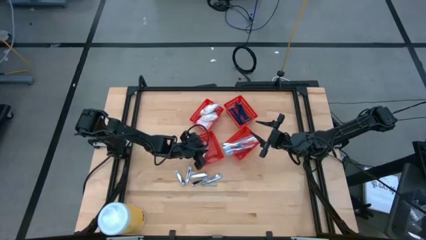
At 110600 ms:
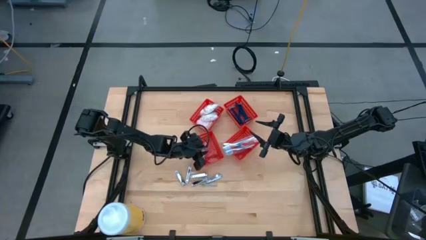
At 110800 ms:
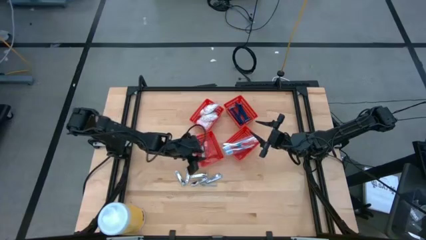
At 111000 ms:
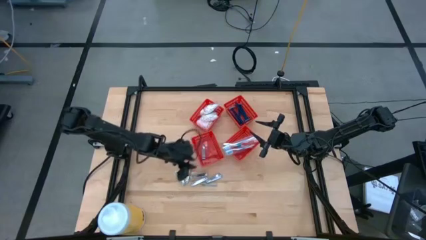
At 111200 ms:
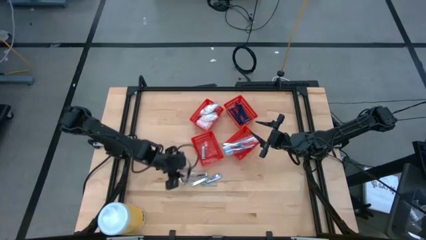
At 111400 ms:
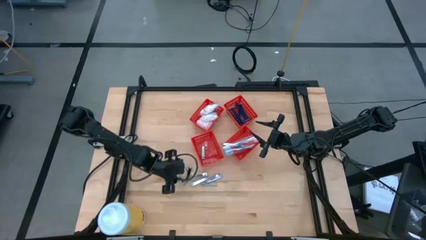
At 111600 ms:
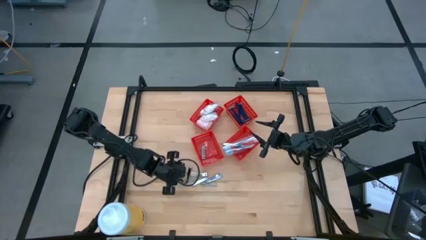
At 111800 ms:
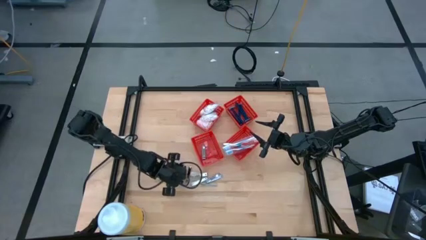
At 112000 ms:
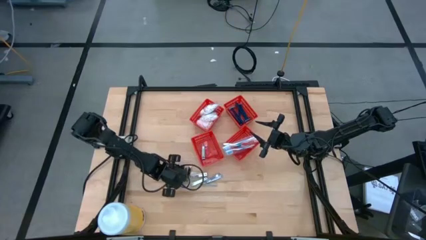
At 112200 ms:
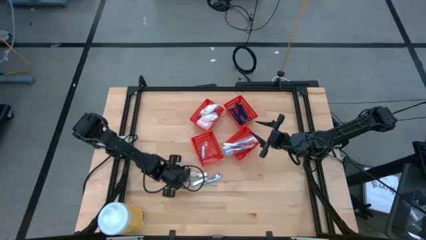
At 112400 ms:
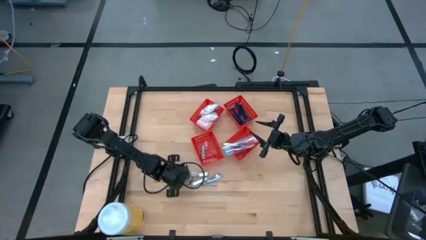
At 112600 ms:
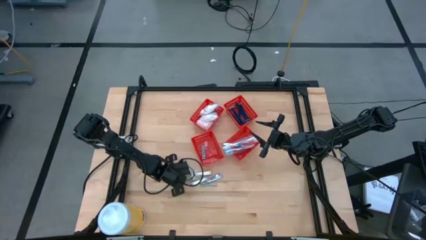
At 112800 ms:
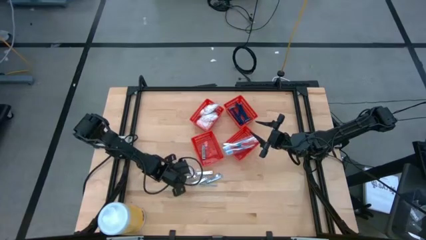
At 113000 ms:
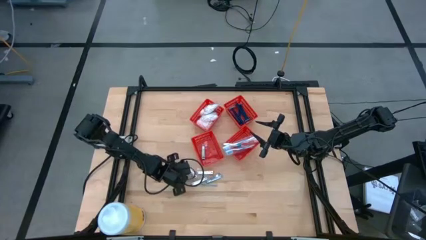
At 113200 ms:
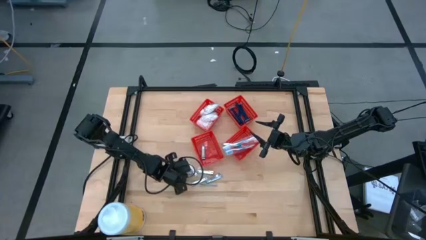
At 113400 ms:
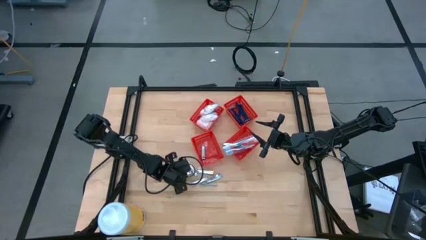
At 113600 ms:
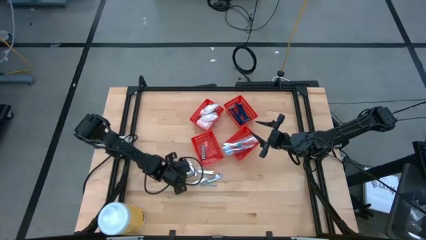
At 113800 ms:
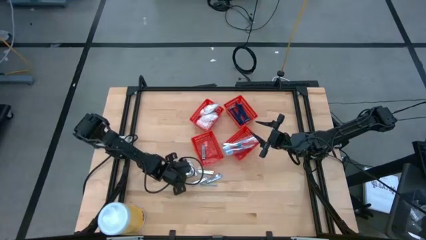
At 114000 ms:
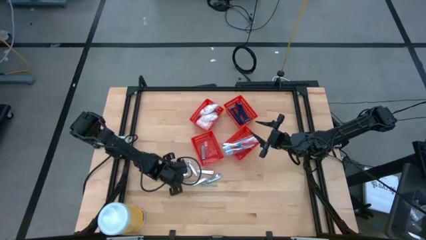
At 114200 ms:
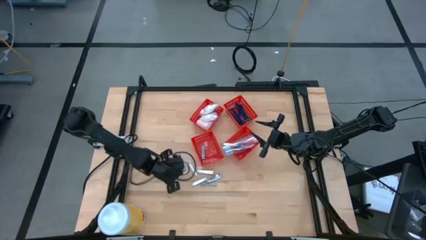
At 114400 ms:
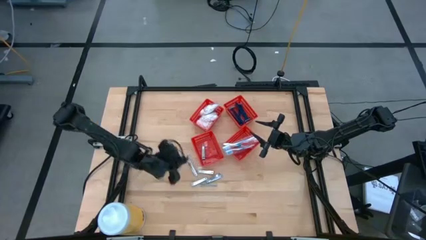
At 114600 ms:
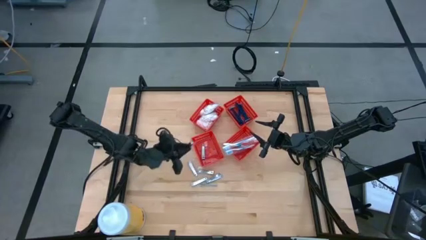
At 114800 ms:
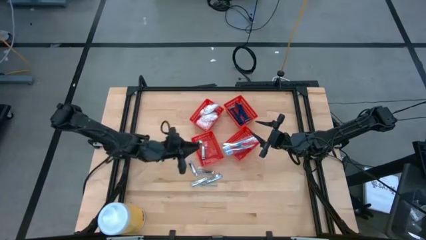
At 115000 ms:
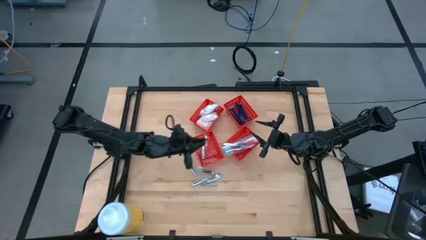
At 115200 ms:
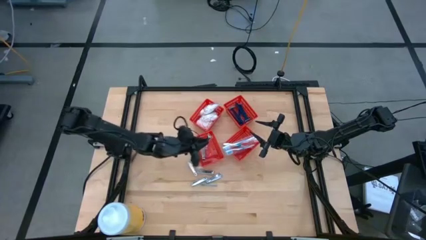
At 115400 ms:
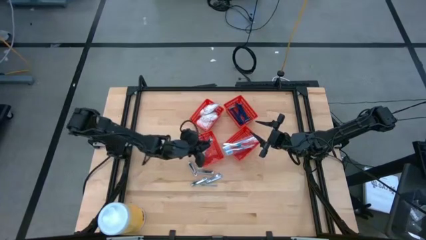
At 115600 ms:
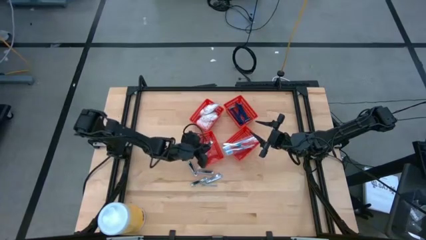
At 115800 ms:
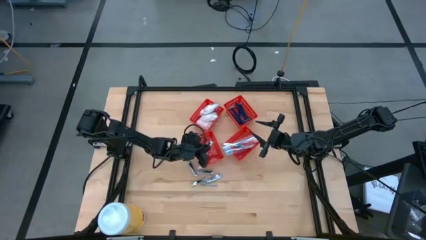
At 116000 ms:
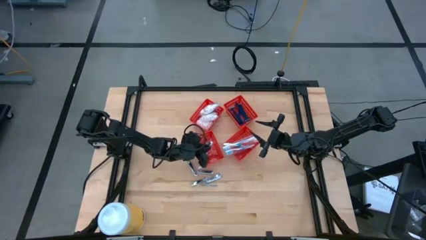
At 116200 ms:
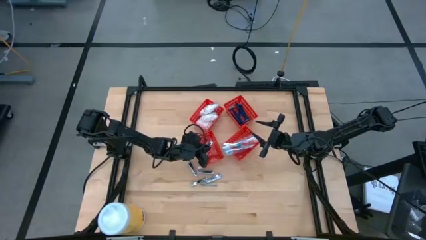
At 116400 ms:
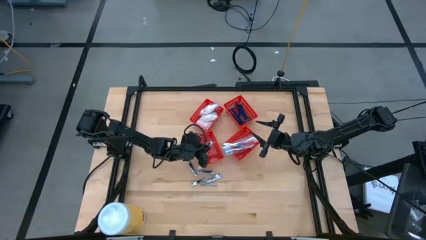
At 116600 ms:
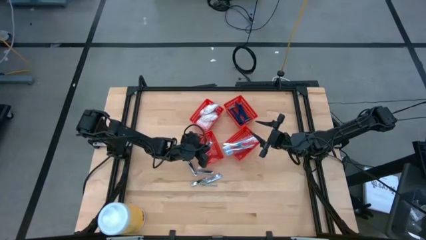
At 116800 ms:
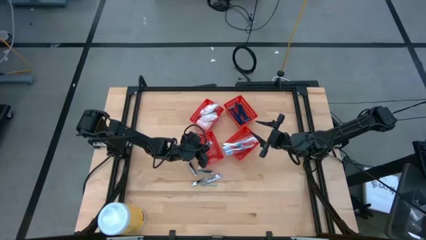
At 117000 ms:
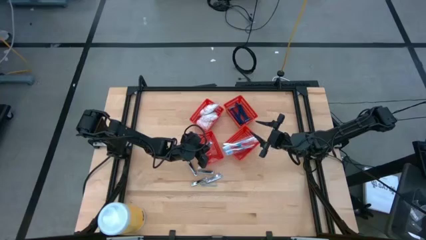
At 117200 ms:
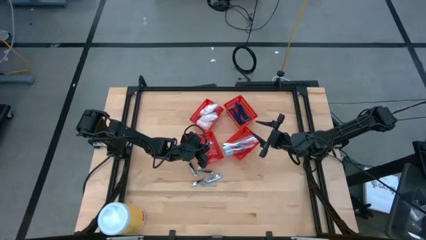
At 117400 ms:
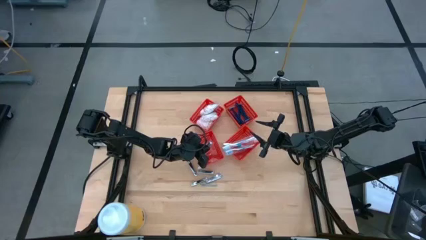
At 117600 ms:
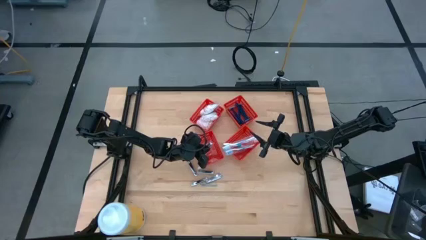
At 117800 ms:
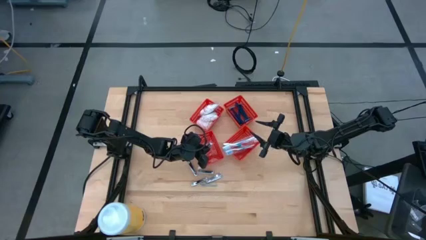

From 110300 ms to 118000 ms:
Task: Pick & Place Travel size toiletries
Put the silver nail cutter into the bottom left red bin

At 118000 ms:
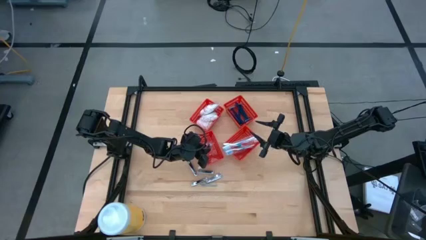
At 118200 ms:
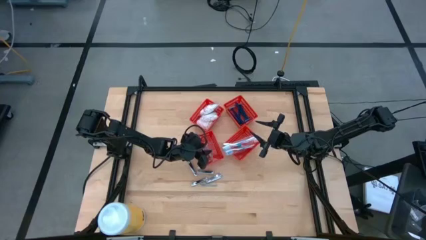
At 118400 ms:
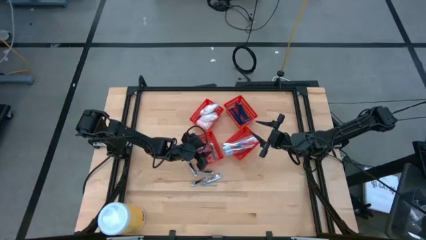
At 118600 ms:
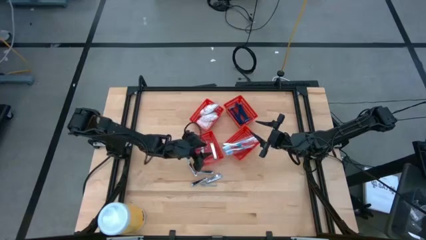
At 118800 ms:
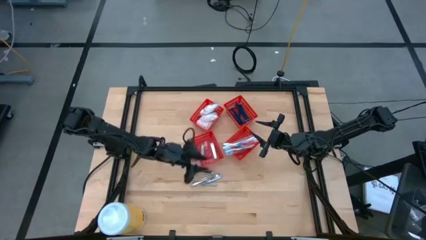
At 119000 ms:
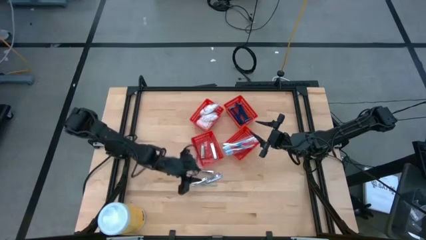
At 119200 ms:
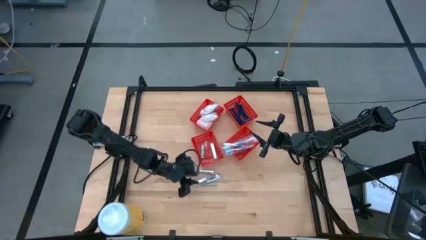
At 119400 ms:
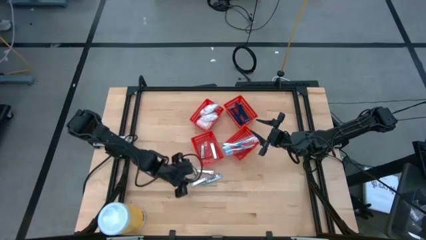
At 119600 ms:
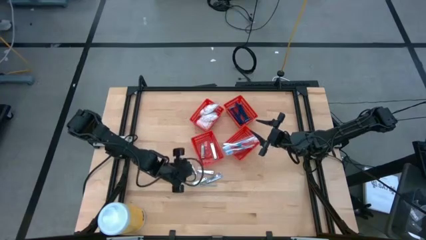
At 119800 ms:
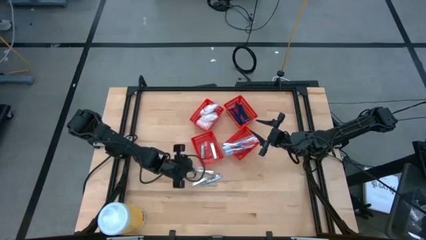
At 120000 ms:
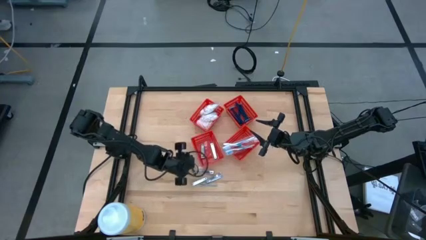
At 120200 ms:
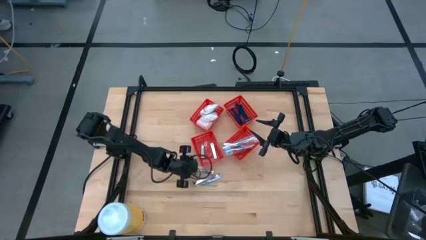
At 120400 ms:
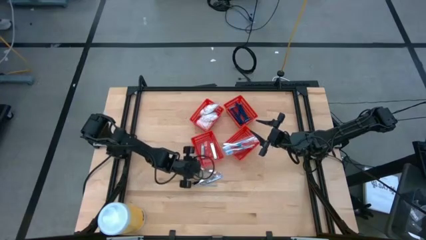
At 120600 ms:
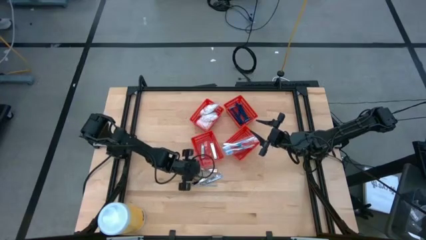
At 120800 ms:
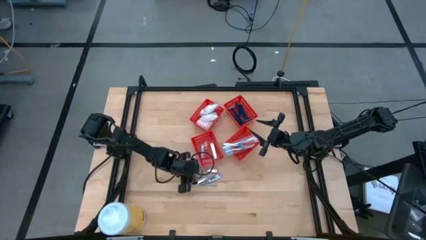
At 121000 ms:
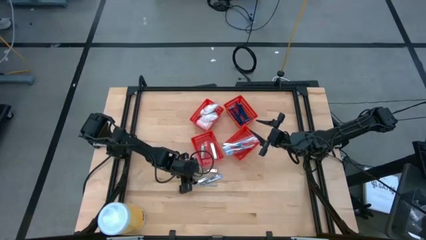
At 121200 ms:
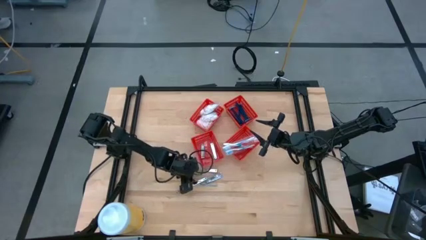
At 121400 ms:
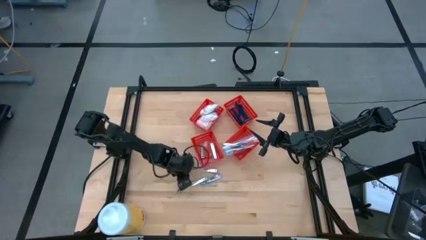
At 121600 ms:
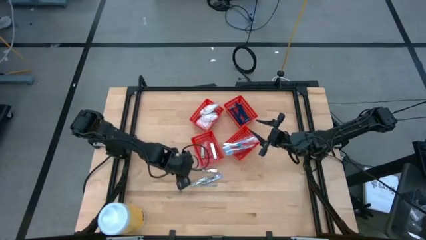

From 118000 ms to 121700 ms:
Put the silver nail cutter into the bottom left red bin

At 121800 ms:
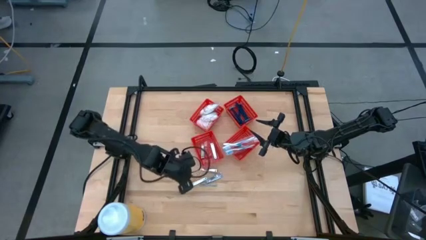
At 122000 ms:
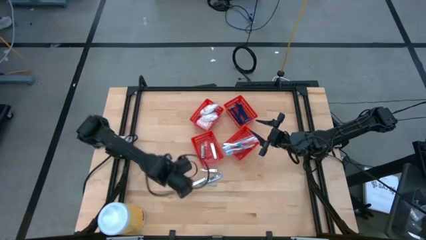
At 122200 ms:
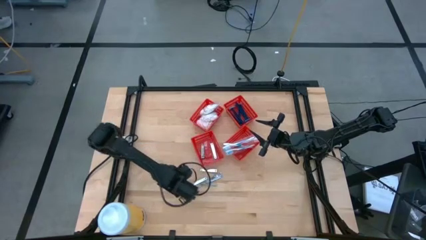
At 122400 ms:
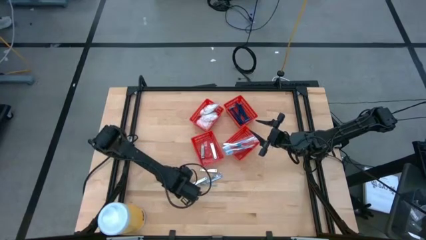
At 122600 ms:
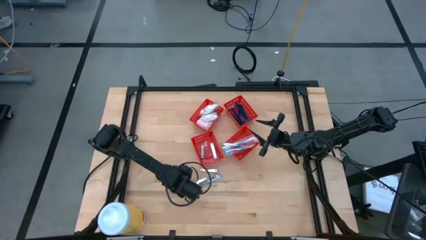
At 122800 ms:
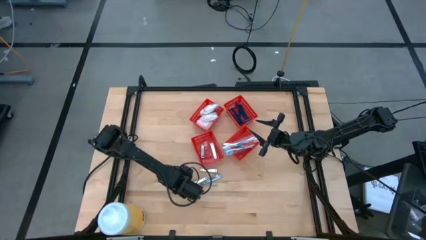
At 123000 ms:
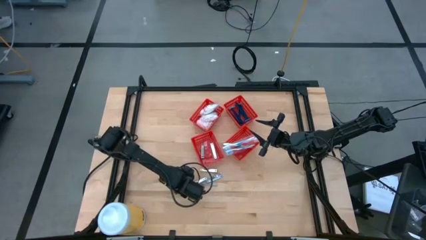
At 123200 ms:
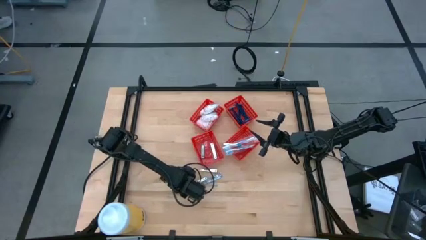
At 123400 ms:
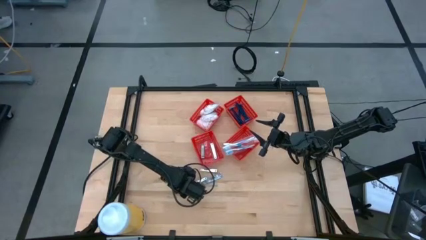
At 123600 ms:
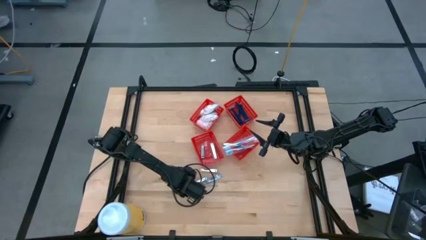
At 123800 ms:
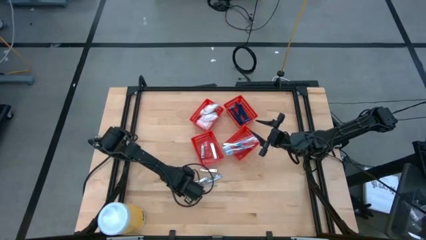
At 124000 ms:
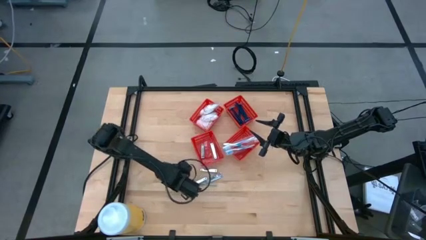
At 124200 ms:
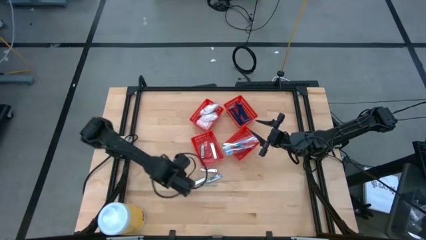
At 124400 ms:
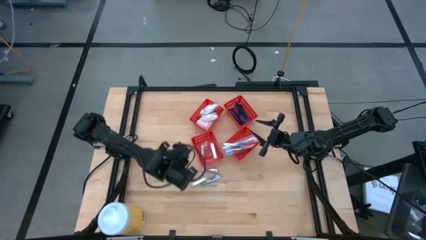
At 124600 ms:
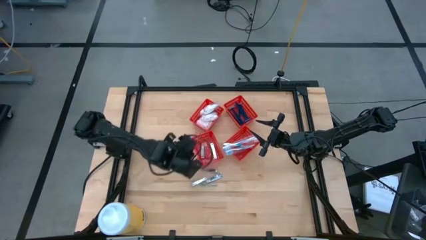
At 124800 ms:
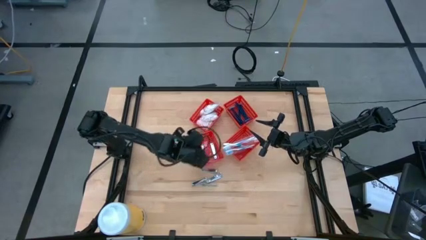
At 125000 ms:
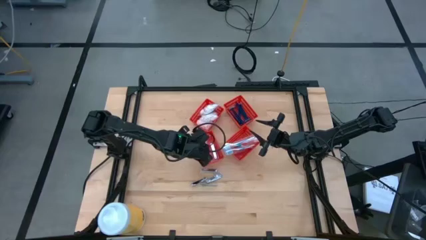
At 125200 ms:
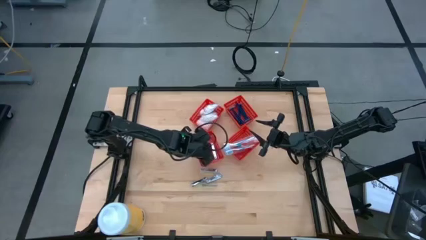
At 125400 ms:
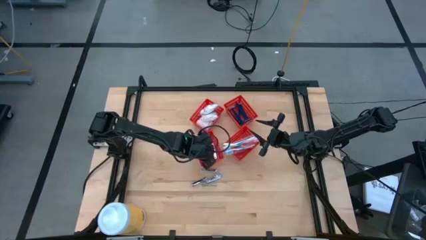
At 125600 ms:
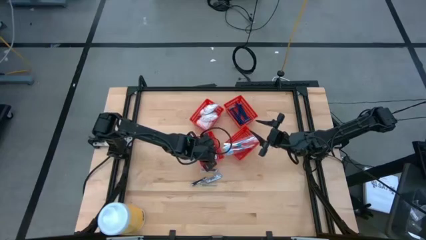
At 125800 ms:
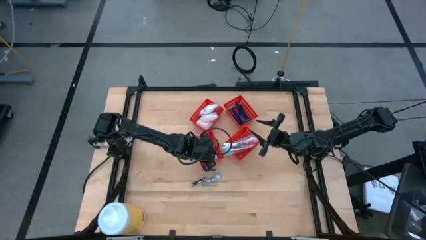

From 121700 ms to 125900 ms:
Put the silver nail cutter into the bottom left red bin

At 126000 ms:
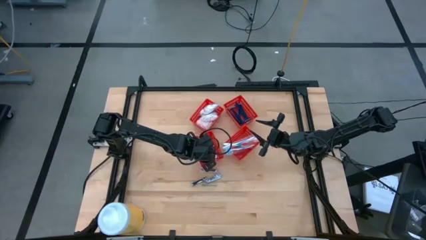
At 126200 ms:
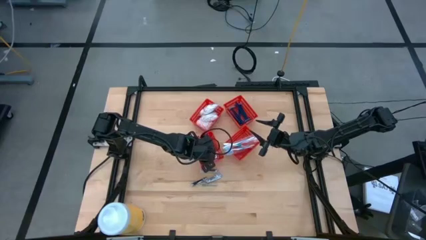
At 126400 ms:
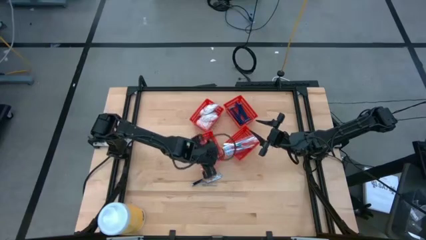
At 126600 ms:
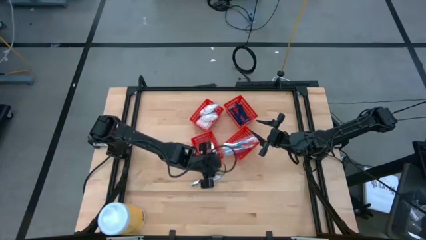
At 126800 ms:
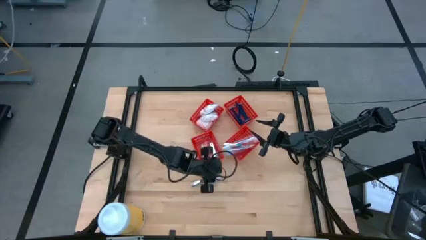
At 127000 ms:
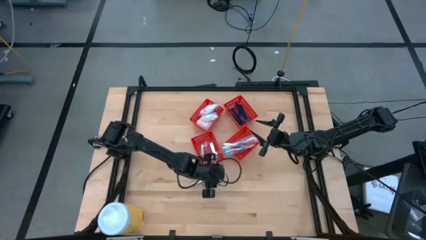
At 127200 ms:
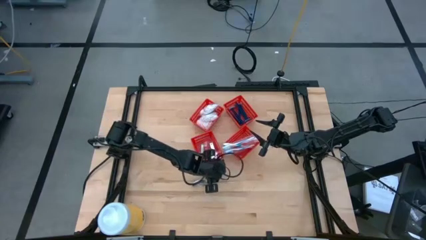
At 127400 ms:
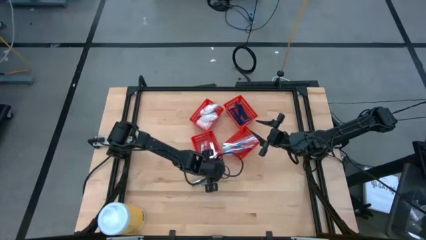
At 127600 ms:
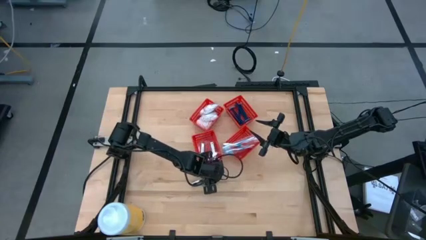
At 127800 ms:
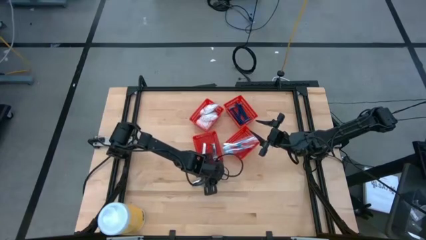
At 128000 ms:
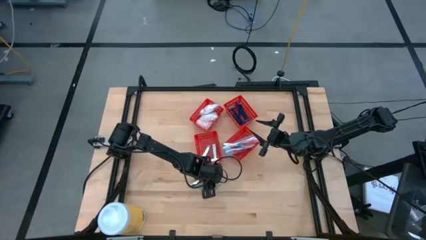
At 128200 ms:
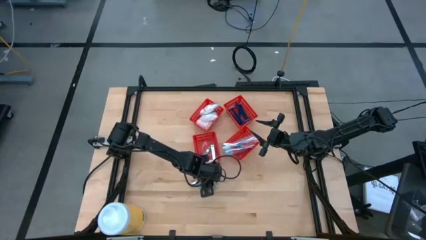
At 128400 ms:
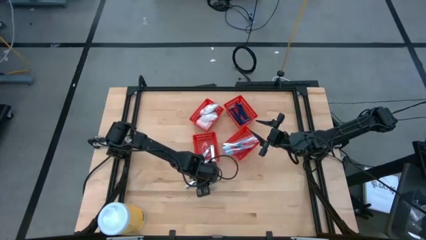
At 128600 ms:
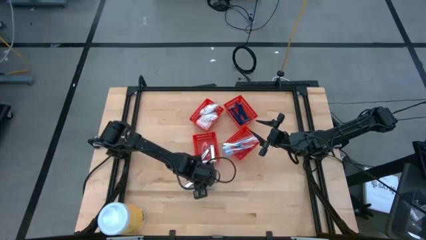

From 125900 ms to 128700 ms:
Put the silver nail cutter into the bottom left red bin
